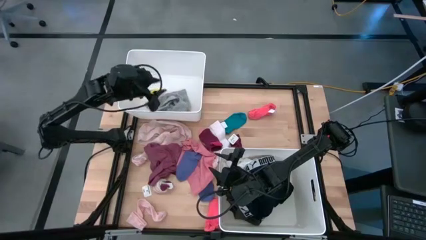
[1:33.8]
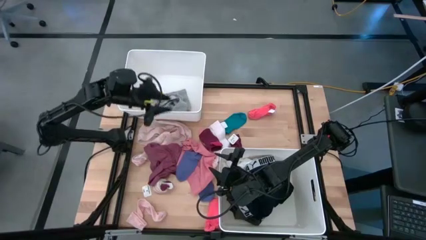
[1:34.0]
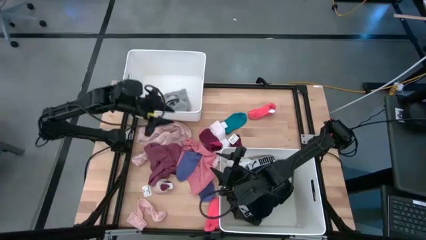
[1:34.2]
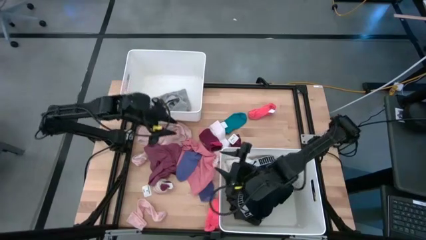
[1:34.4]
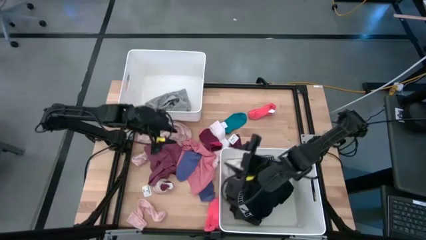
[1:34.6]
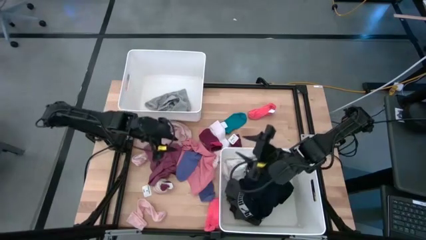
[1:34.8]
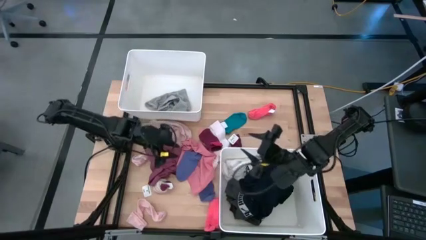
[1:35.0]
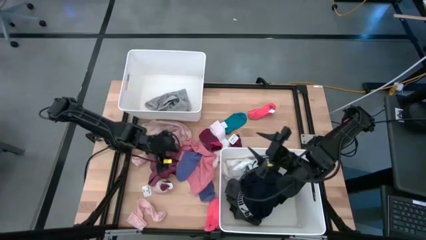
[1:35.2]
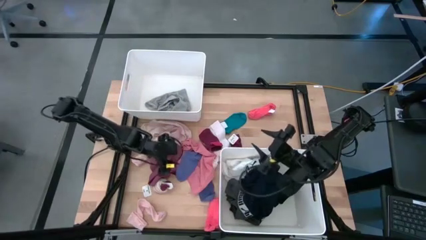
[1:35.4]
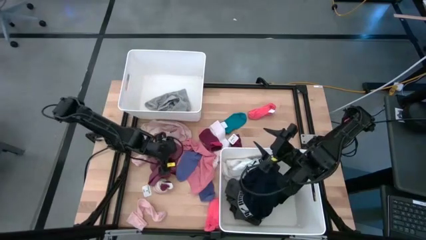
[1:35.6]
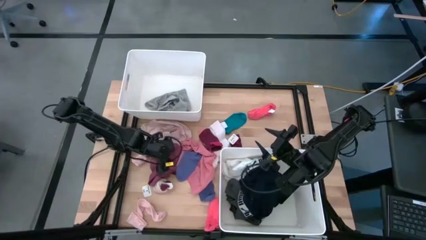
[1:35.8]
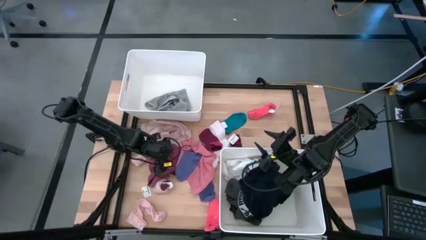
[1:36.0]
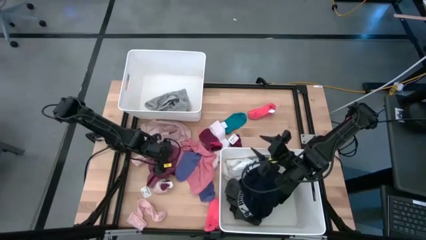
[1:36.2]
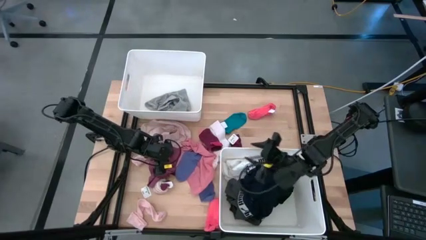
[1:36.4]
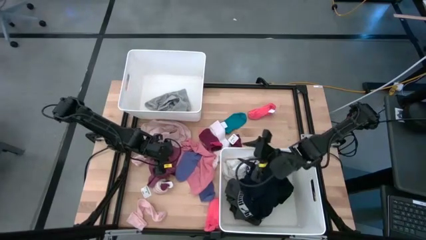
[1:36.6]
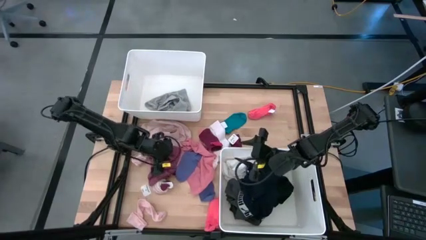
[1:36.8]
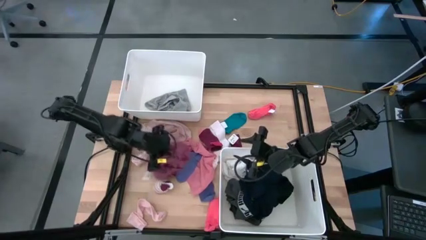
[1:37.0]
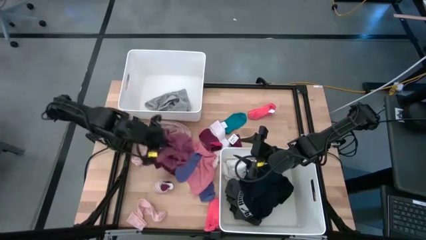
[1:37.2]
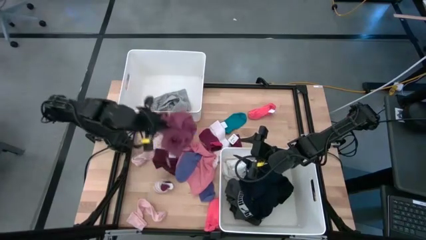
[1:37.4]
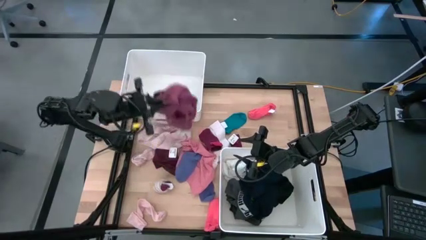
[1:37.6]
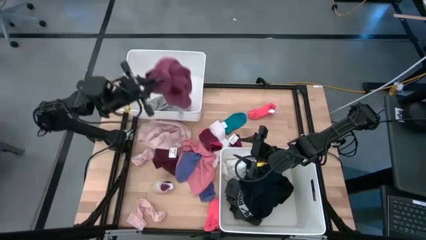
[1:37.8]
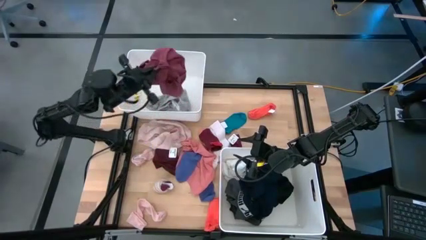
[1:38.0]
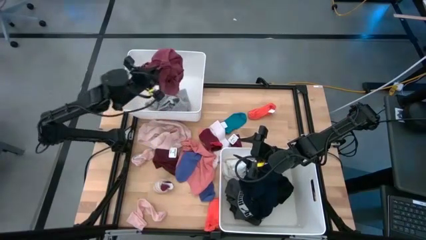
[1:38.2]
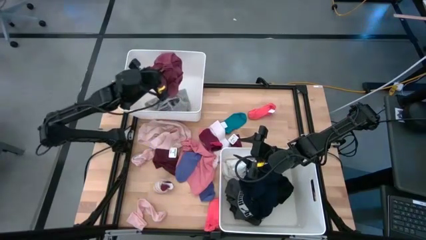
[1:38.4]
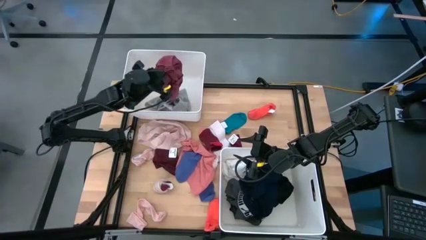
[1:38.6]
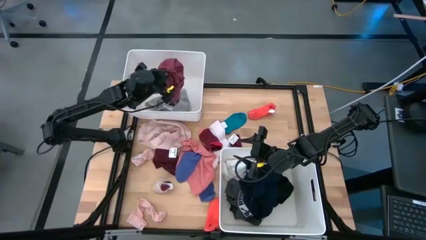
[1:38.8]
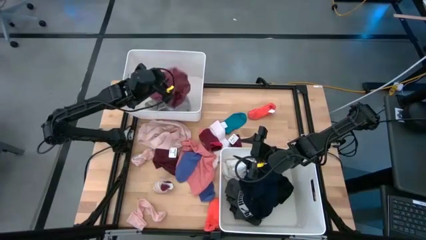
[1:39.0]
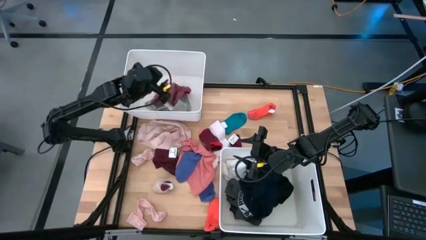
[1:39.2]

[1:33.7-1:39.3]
Task: Sort clothes
Put the red underwear into the top white bin

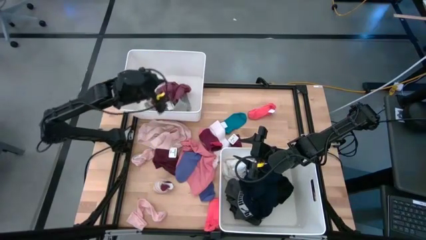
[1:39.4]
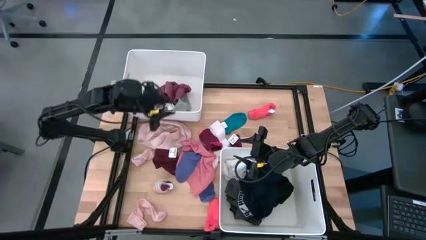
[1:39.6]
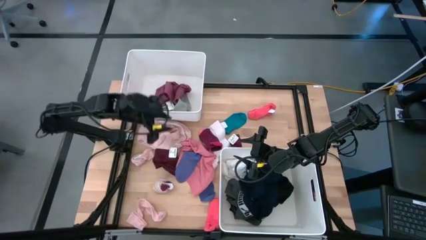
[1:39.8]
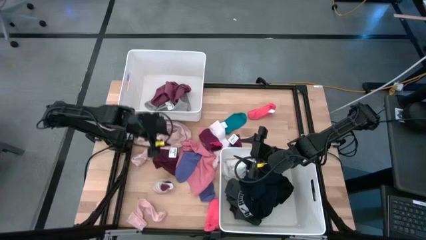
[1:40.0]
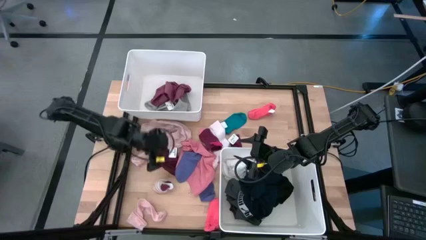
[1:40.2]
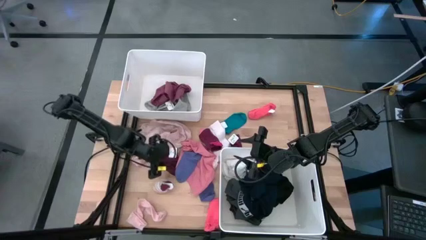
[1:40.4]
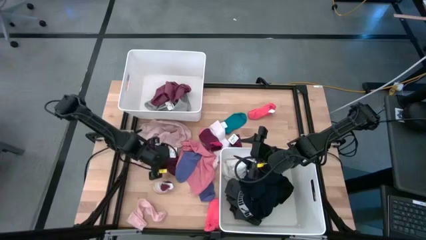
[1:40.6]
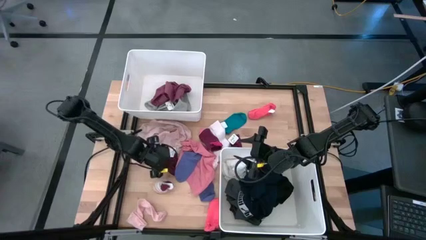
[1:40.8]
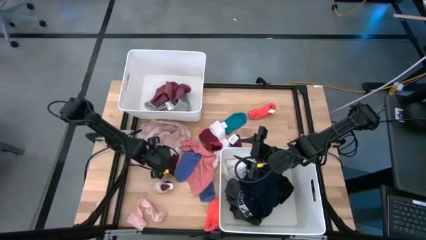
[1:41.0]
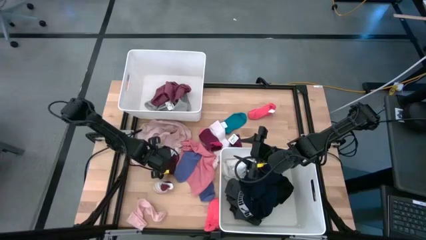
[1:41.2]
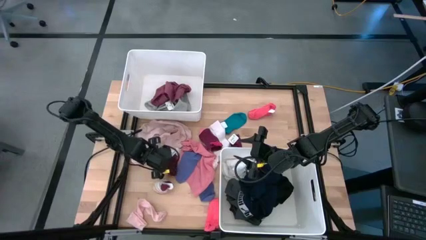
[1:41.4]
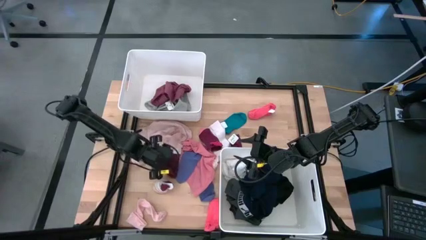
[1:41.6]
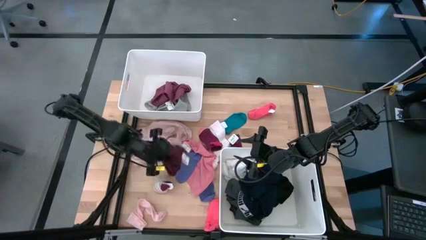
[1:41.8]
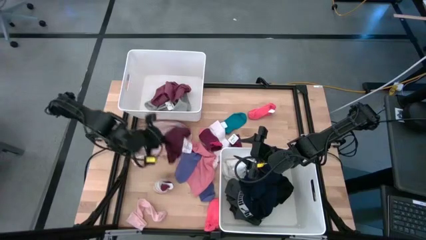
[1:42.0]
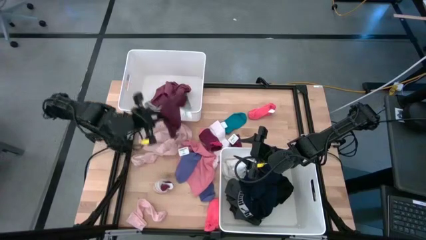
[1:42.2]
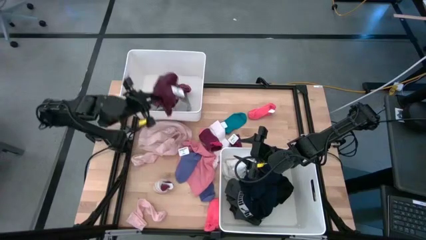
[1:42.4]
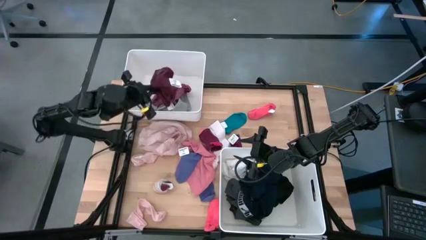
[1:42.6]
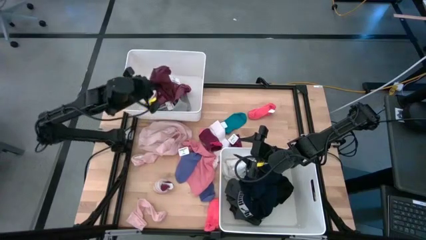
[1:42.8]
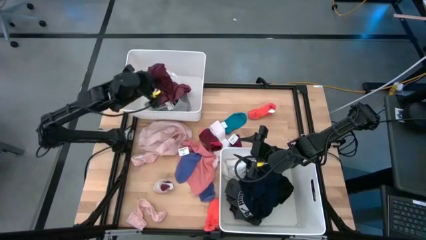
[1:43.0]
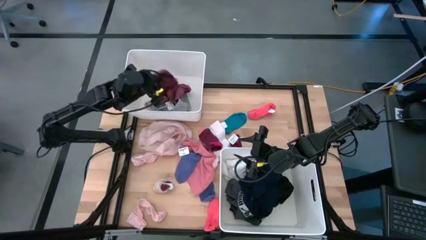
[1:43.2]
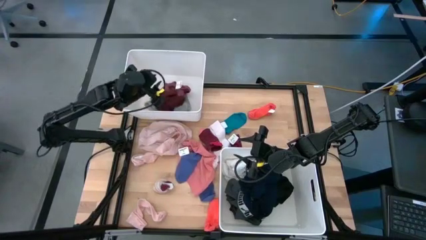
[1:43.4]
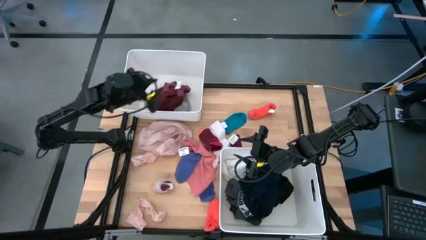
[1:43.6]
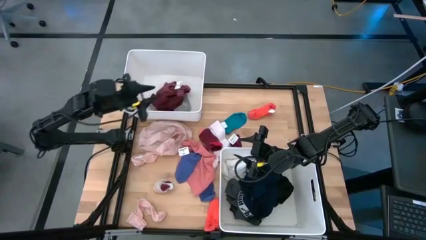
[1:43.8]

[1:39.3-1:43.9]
Put the red underwear into the top white bin

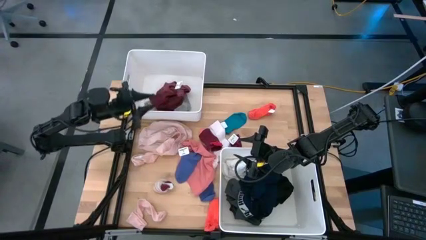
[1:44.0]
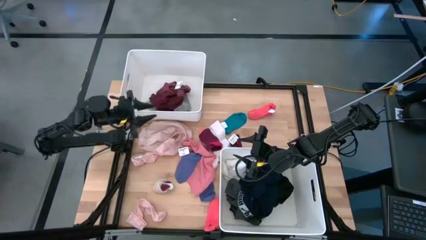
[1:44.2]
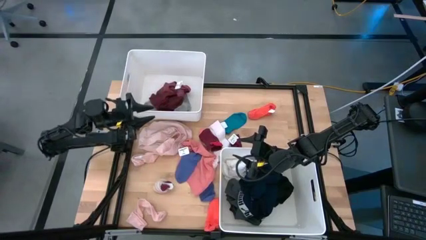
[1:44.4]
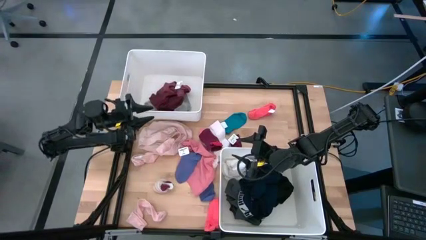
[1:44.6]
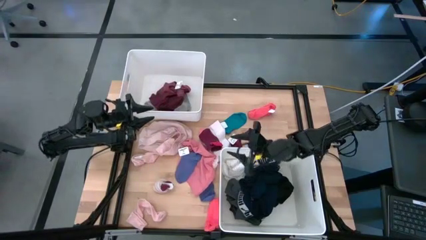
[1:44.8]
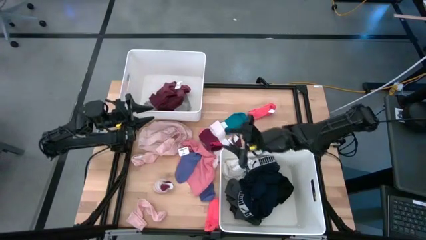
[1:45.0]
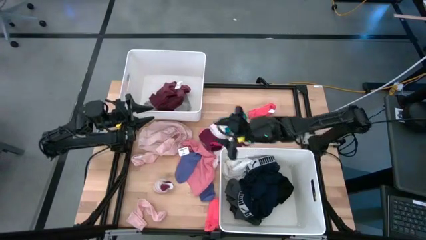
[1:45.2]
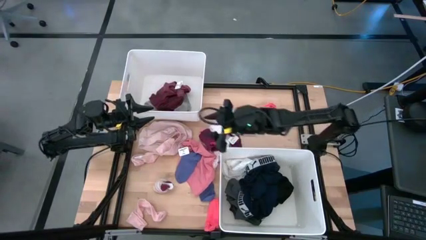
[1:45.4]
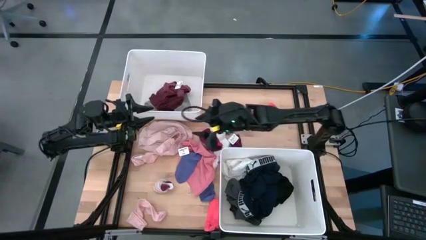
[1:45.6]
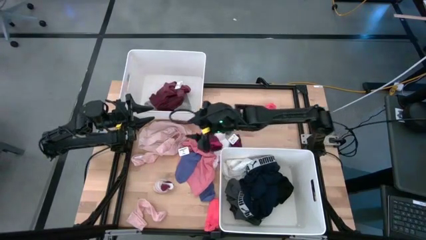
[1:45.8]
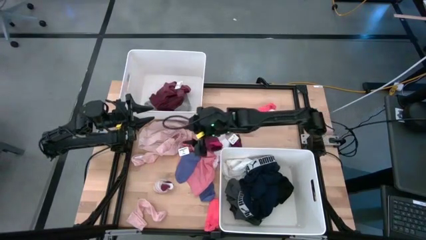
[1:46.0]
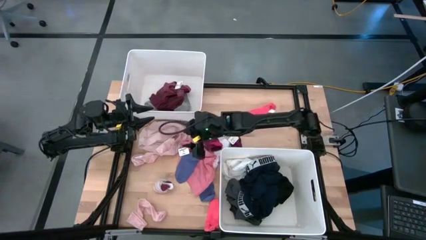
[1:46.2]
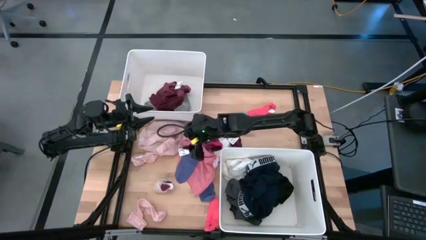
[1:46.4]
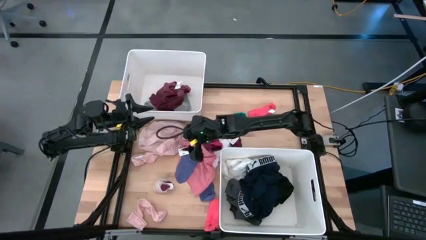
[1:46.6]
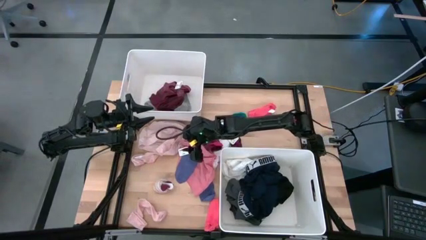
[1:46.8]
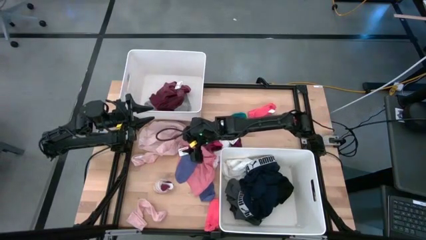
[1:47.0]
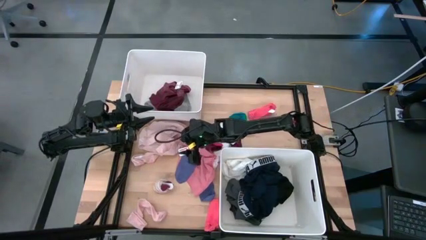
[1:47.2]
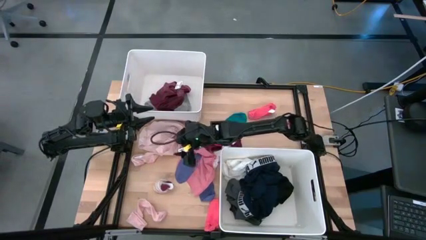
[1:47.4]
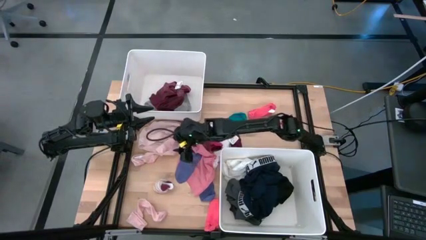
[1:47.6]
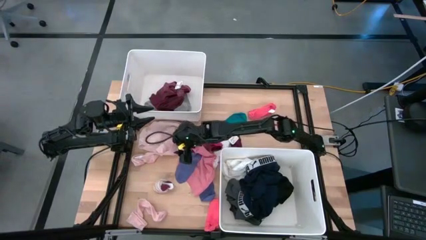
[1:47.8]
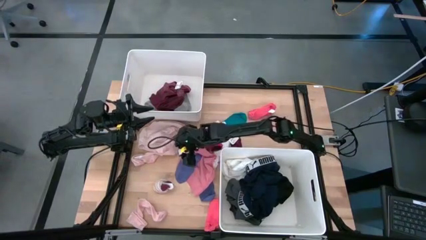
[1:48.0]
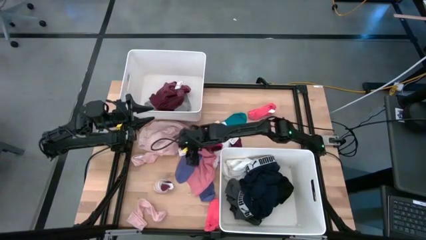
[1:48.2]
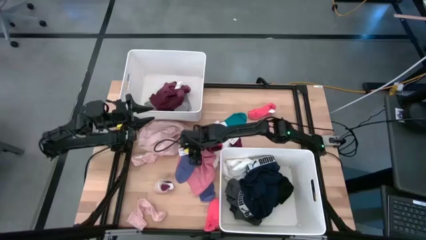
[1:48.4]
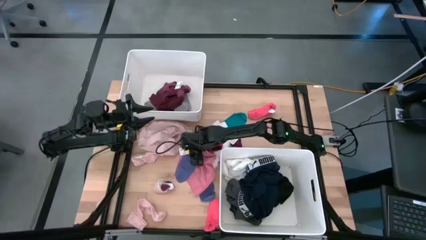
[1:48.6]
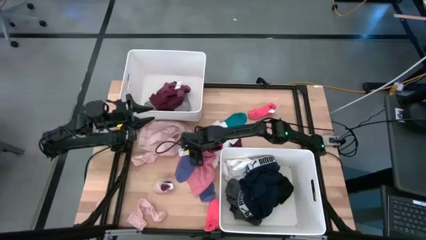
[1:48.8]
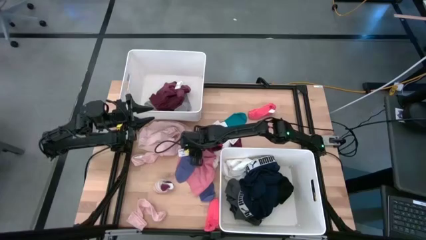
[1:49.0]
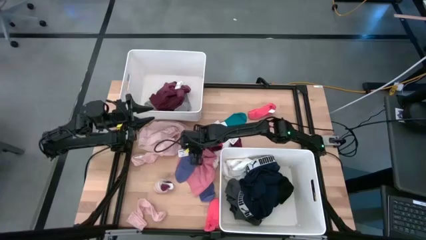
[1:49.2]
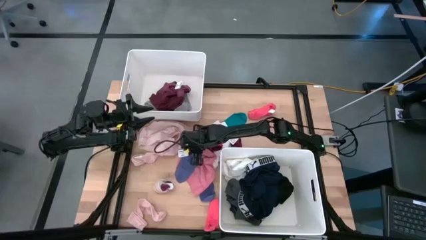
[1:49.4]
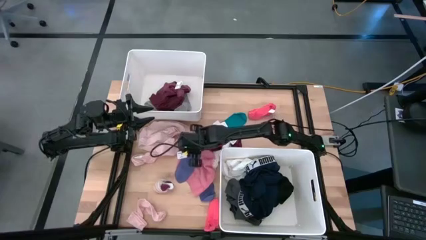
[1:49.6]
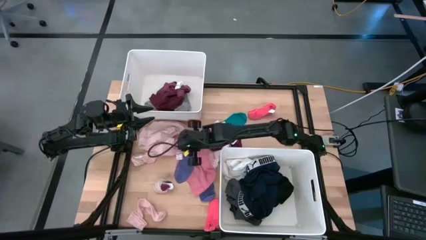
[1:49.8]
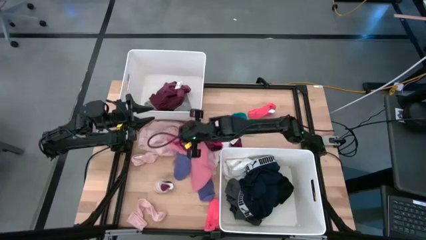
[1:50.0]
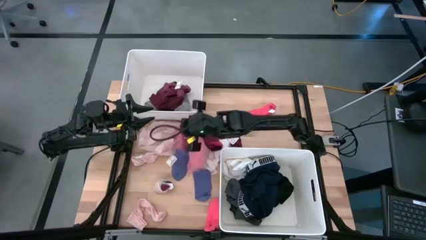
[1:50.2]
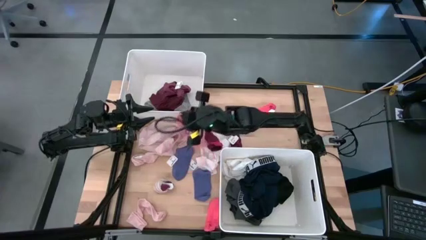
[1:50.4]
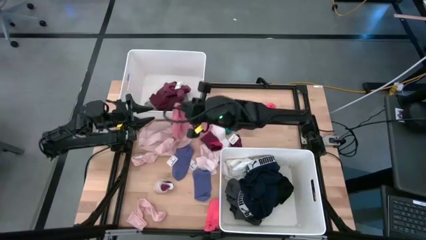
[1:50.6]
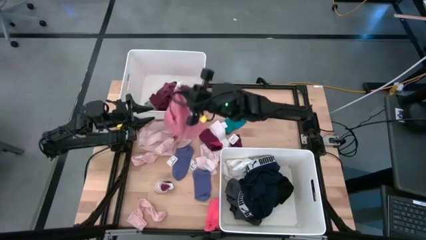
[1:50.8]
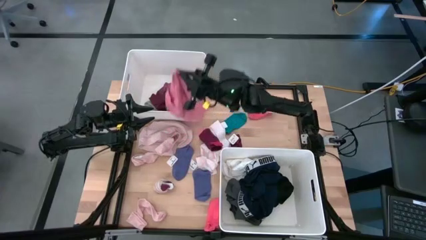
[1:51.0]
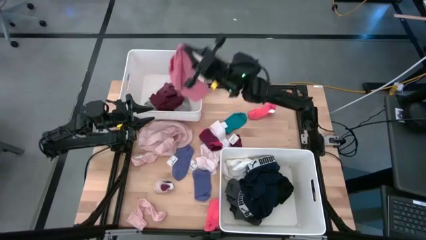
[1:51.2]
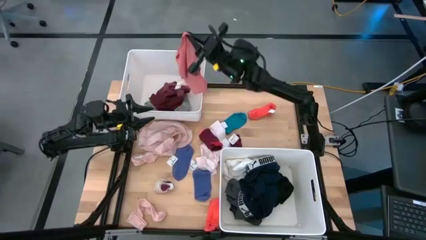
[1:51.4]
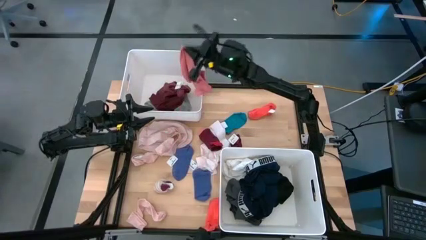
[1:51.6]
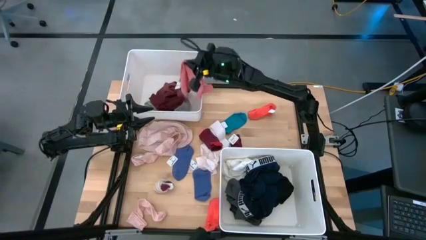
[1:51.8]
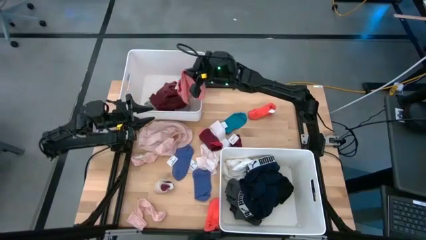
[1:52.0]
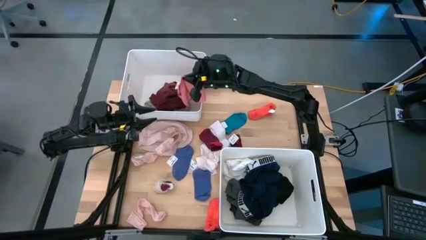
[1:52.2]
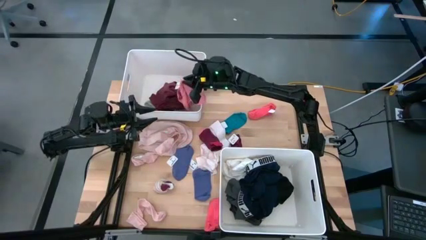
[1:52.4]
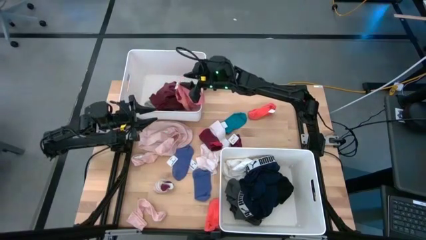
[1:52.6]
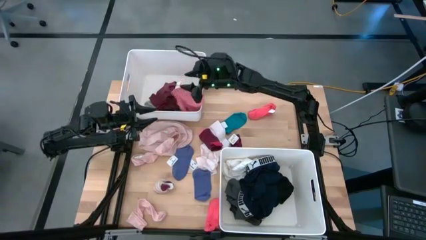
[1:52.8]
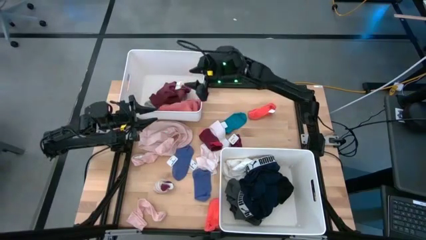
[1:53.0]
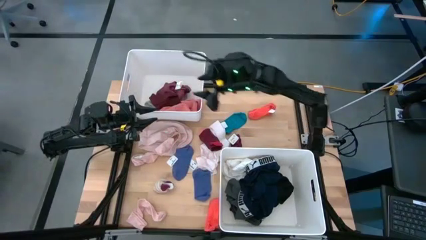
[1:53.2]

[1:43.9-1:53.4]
Put the pink underwear into the top white bin
